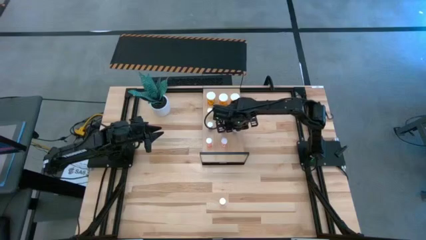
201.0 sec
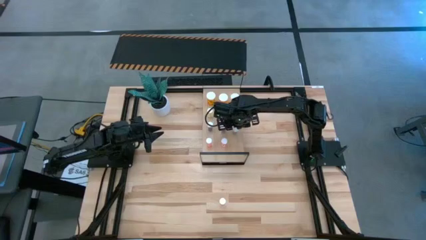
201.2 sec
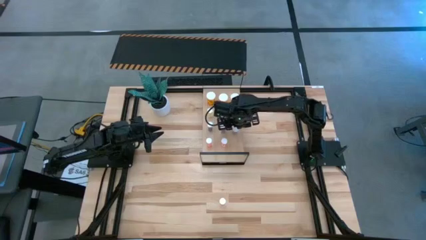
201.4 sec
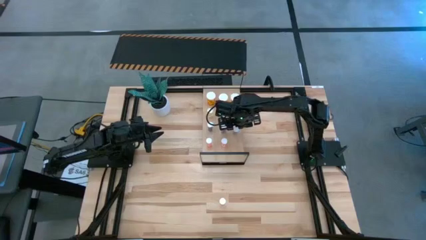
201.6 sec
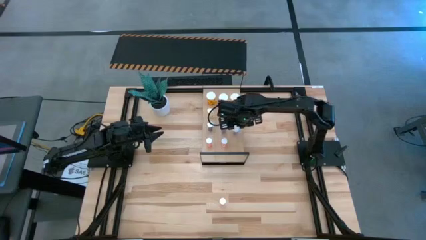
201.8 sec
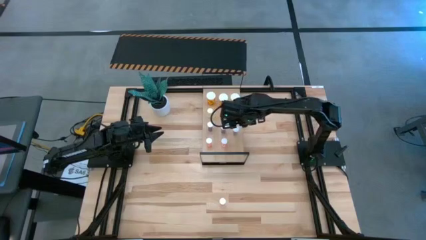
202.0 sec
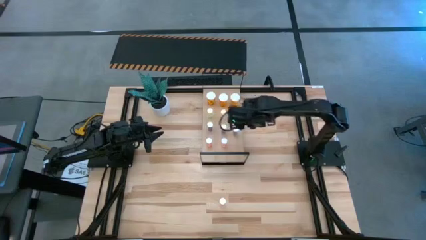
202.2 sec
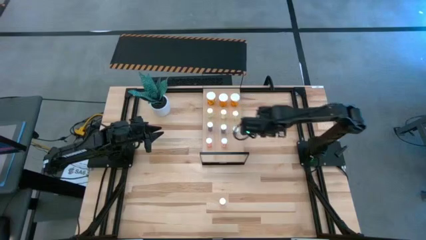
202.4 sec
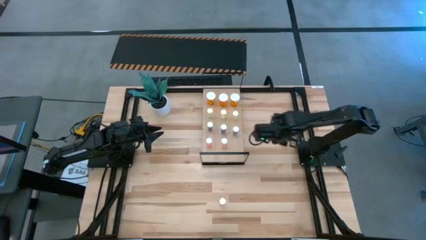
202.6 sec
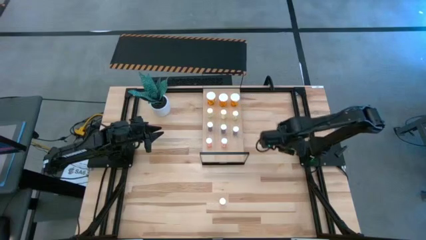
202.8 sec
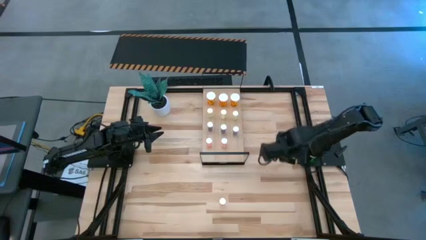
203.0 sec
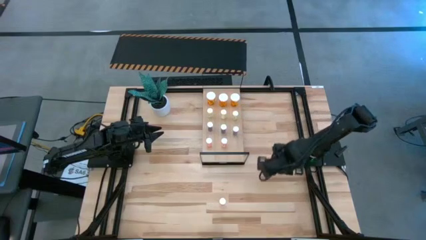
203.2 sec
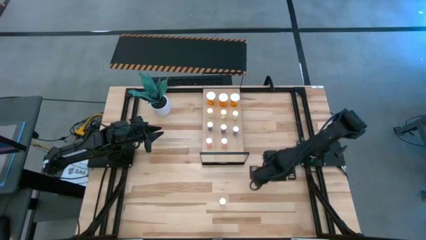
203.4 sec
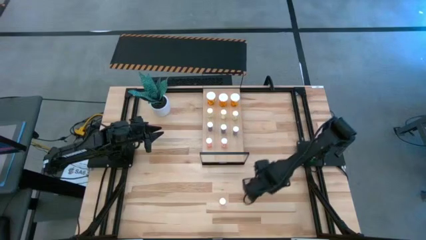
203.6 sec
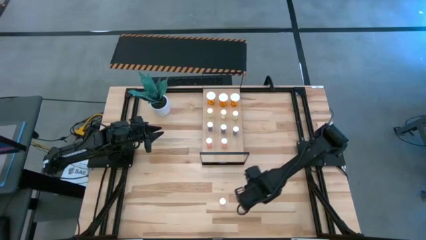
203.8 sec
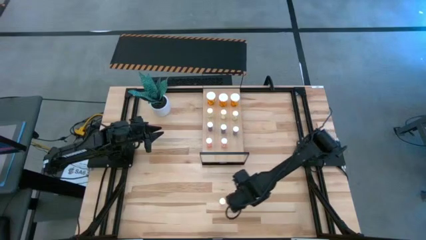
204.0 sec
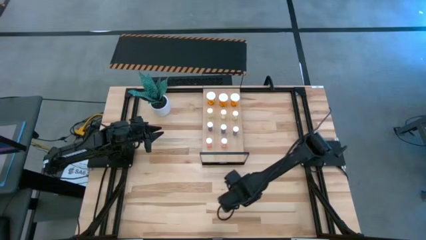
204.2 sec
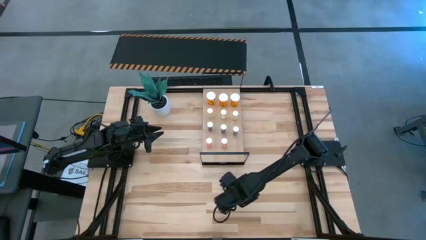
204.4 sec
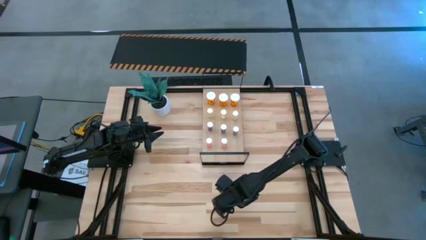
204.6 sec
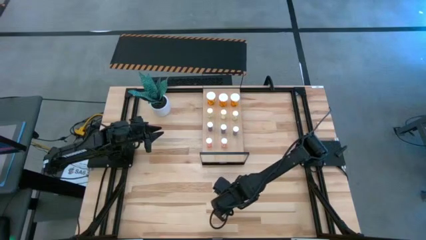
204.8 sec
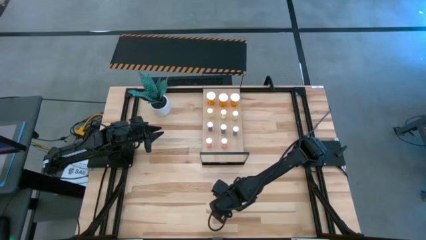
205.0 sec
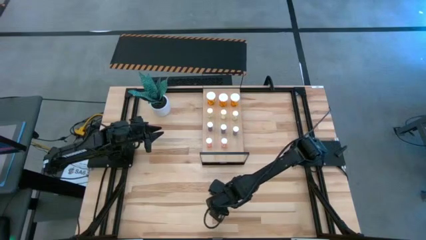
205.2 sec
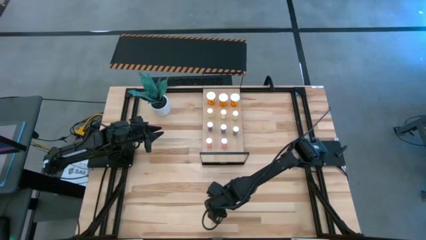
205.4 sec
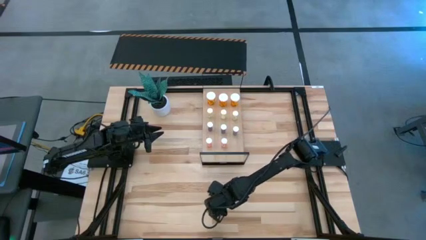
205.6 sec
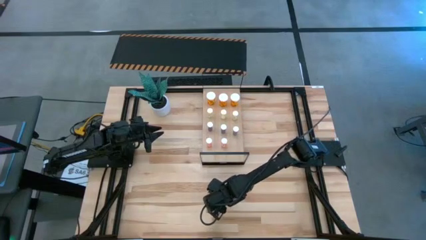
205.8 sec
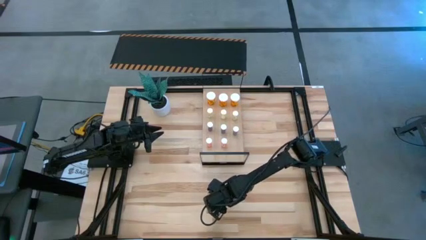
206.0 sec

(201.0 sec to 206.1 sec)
Task: Pick and place medicine bottles onto shelf by color
Put the small pink pill bottle on the shelf aligned with the other small pink pill bottles

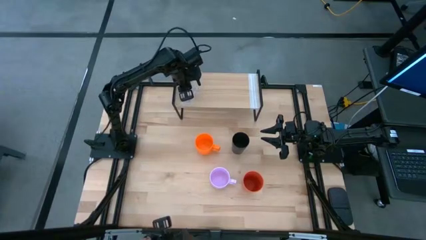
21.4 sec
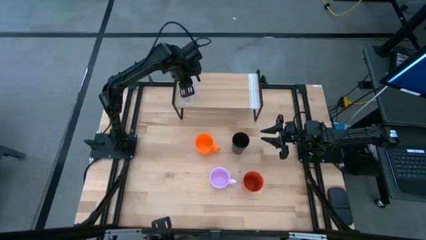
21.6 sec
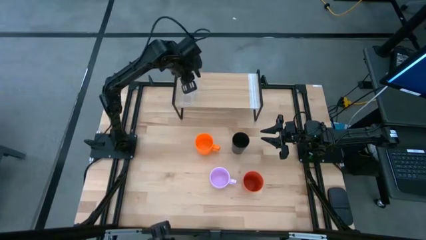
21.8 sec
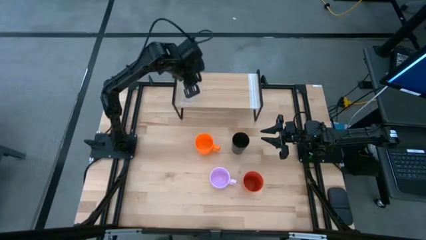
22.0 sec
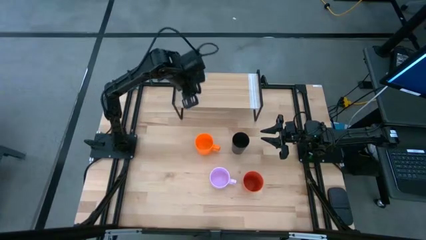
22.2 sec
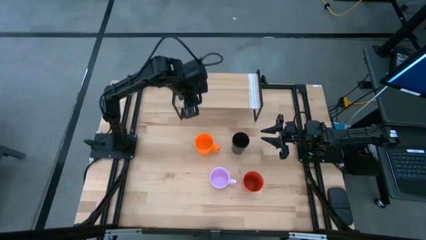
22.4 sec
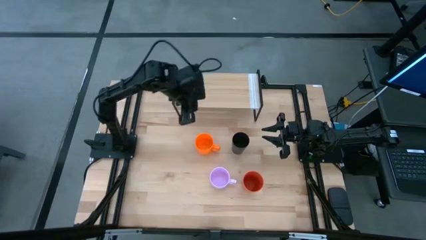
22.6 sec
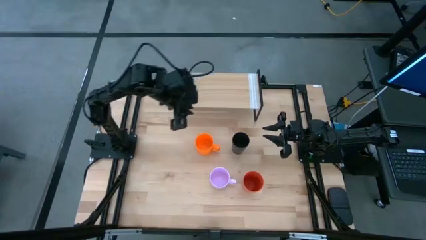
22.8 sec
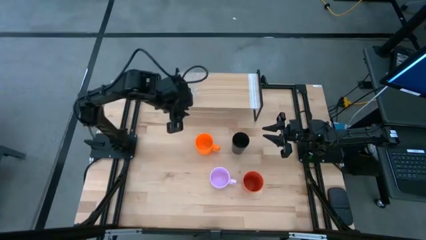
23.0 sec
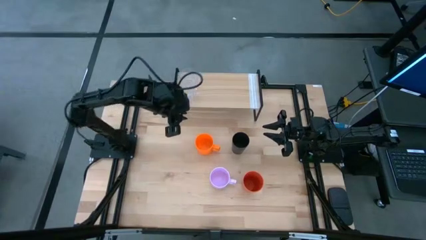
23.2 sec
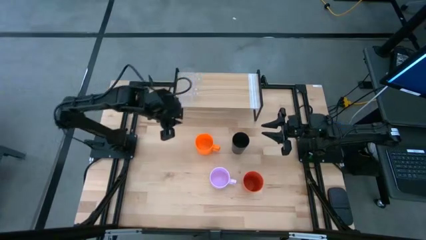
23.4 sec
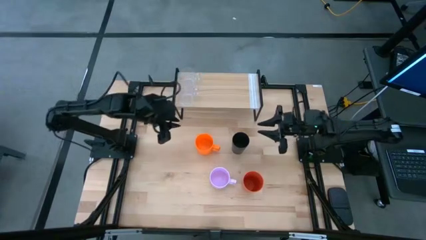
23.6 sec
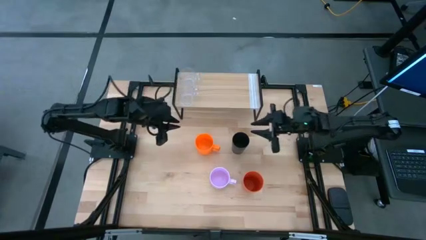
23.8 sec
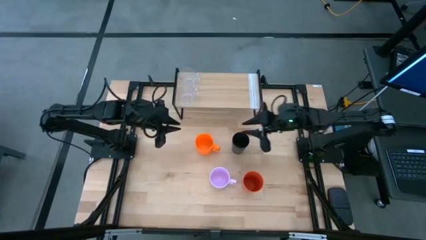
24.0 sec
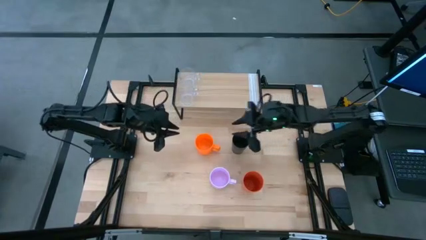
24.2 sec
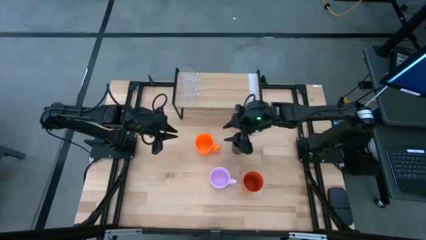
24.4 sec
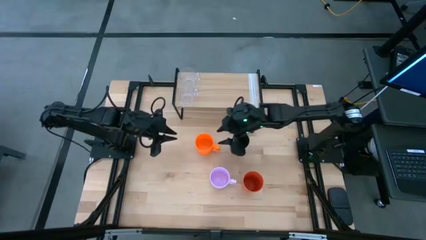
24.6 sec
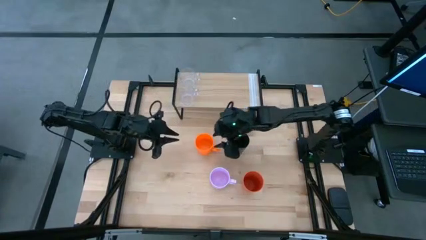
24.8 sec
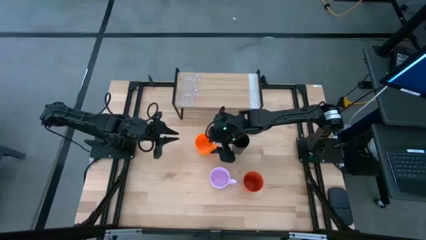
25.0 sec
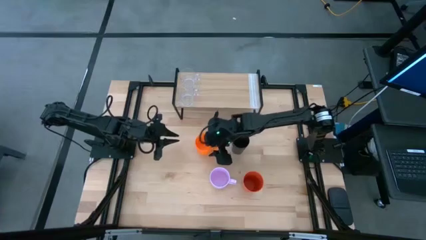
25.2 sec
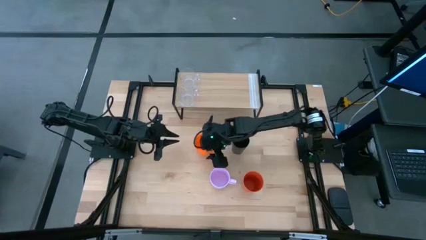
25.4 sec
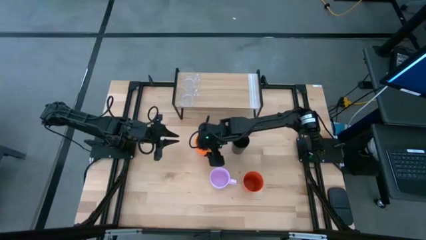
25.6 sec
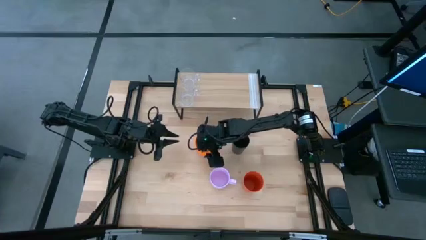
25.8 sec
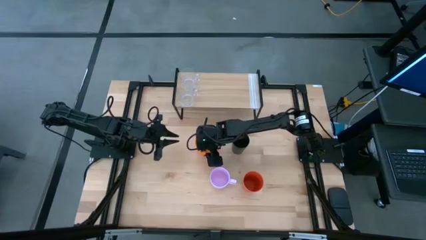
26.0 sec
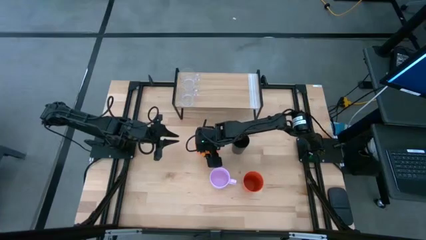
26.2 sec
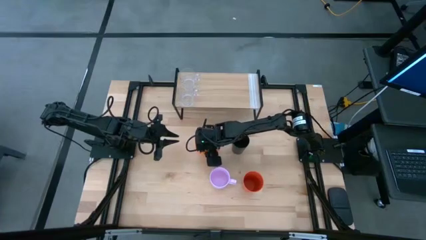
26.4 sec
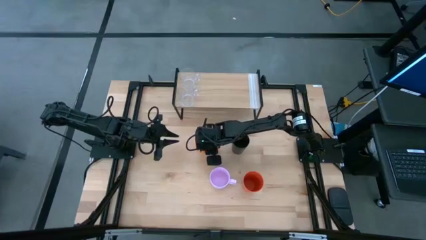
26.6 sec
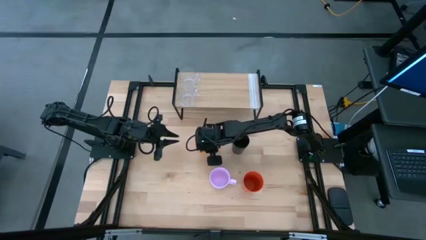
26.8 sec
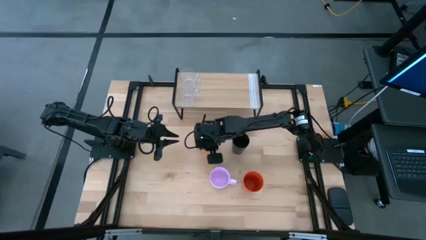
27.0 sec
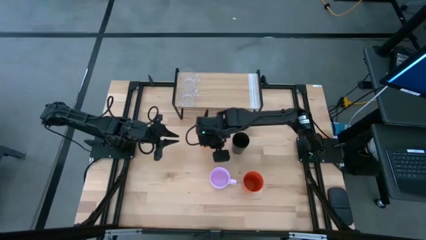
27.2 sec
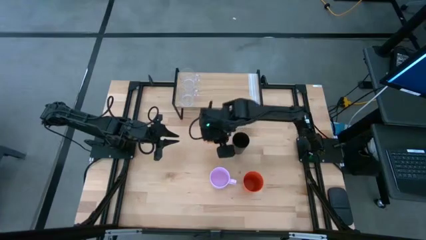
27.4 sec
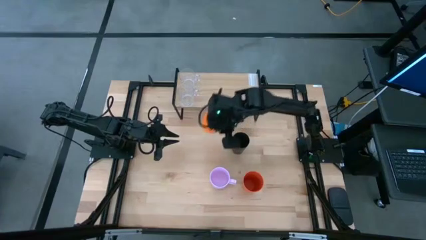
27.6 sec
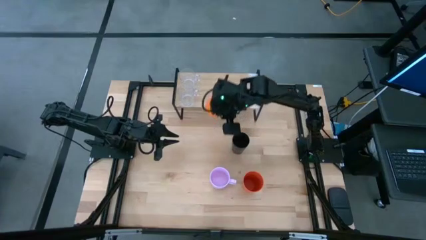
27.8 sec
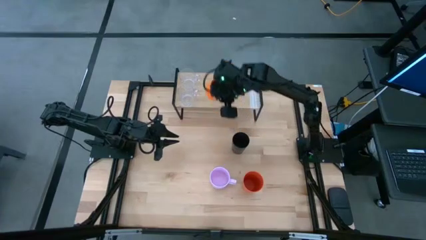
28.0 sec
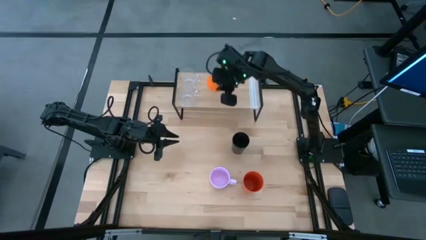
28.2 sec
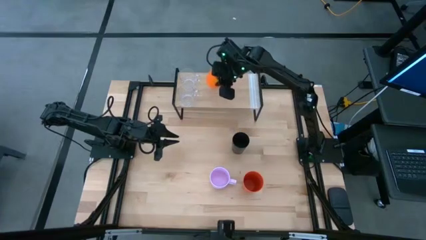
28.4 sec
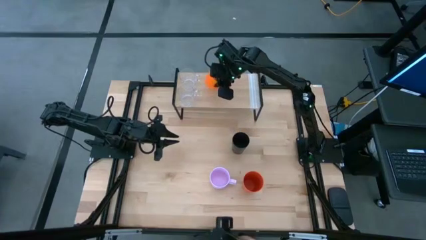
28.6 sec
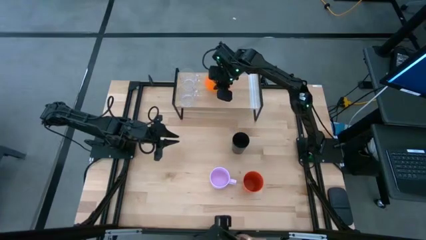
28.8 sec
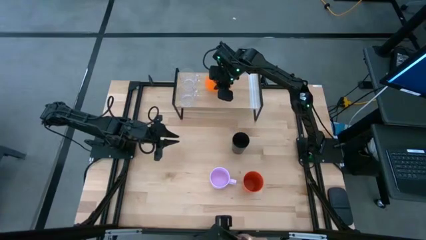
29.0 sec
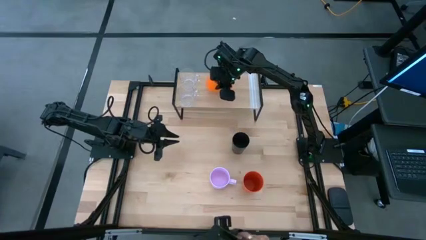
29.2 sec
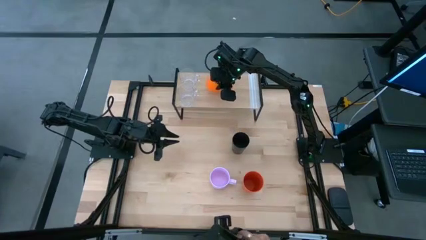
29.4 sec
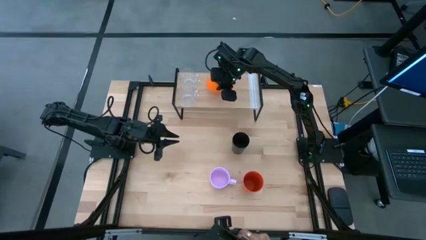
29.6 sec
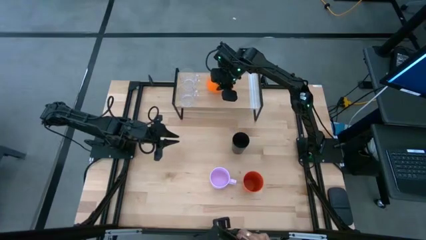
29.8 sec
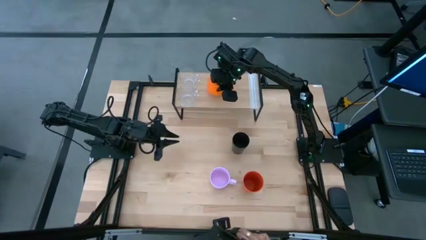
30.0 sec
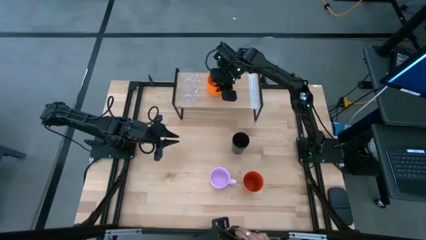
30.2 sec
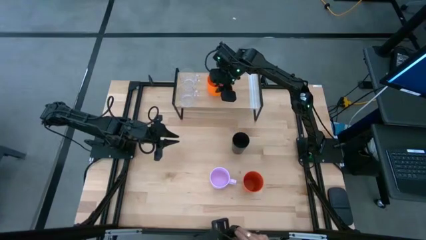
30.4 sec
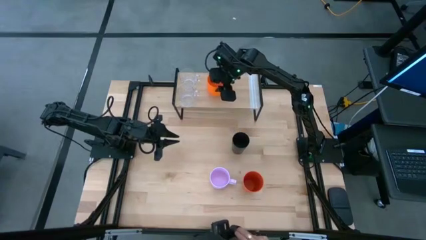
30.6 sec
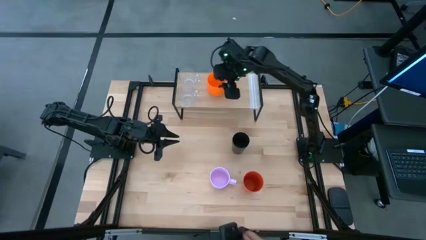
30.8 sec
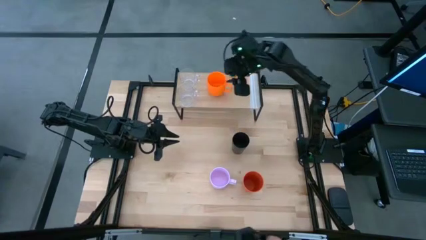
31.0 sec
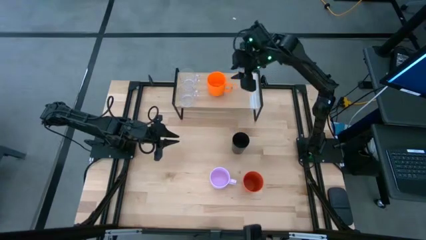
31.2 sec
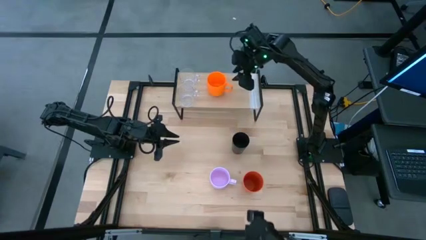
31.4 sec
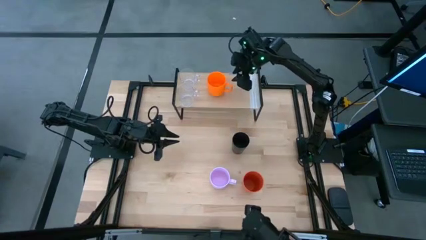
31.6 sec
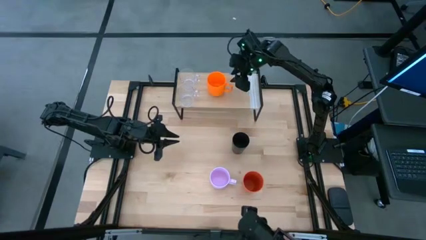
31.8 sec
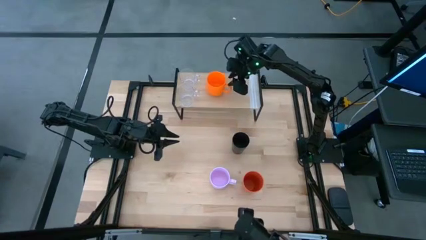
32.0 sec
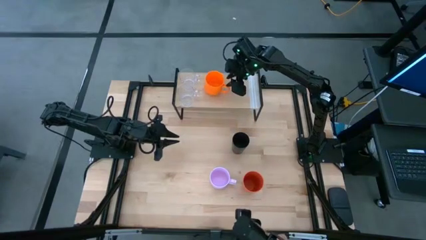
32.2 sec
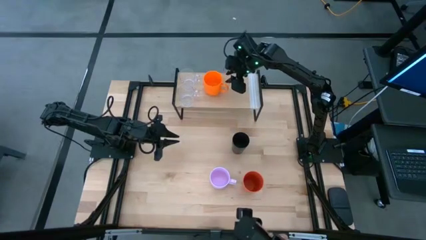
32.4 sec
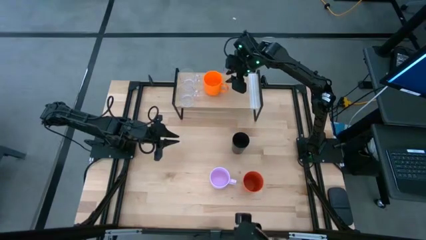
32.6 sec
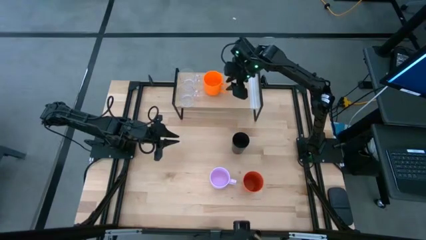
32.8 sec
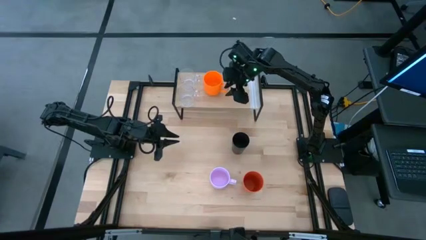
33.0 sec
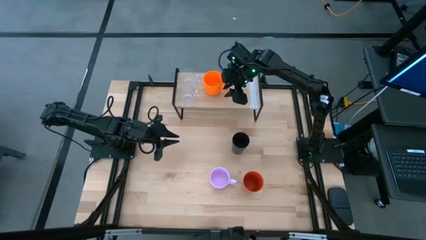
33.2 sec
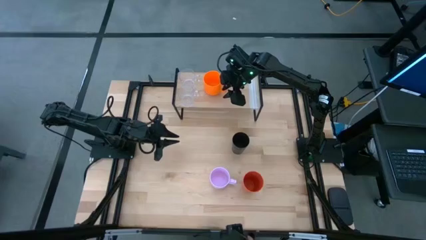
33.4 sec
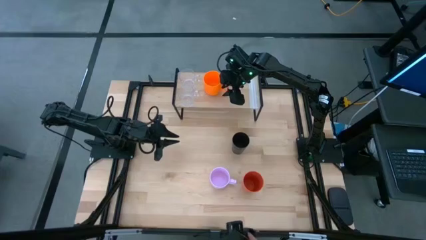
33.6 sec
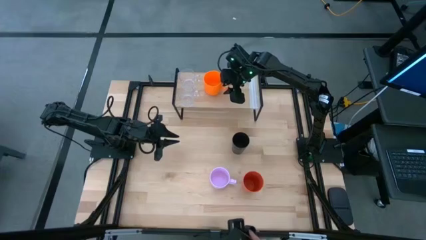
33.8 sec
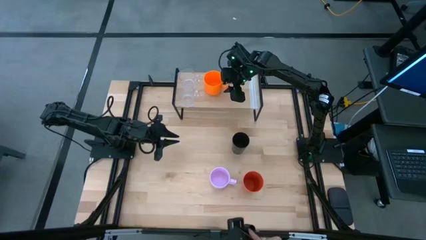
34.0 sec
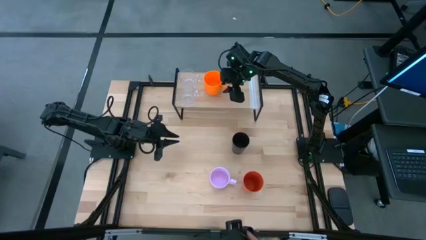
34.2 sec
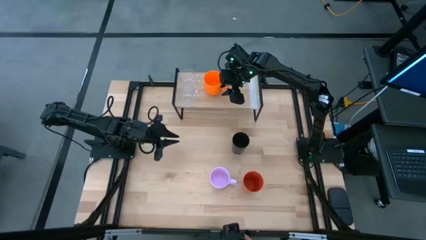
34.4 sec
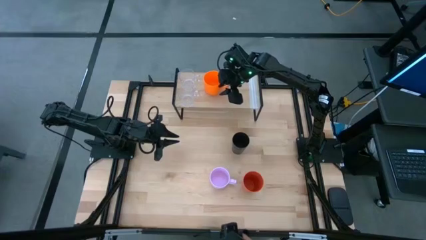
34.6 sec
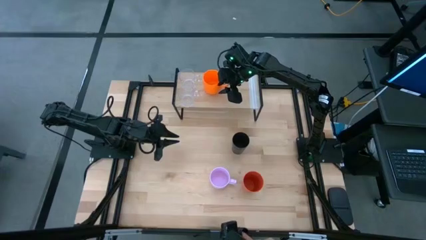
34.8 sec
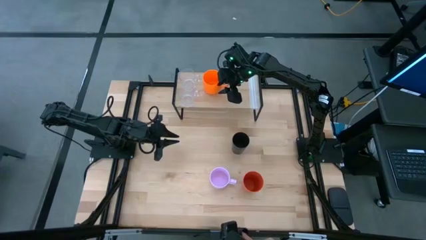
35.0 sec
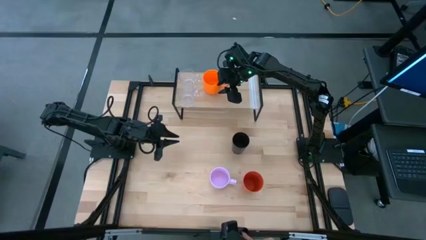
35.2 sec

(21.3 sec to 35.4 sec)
Task: Stack small to large cups/mugs on shelf
Put the orange mug on top of the shelf
